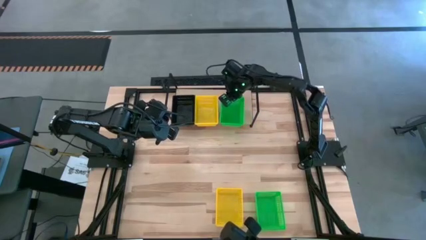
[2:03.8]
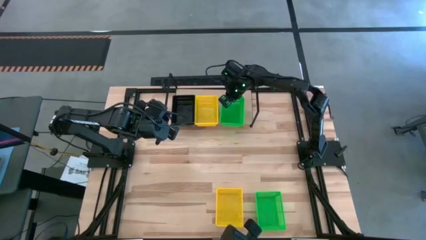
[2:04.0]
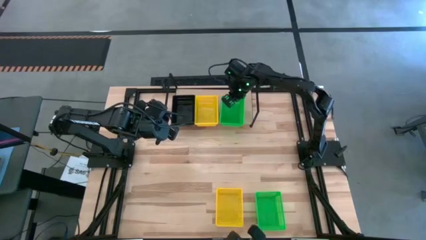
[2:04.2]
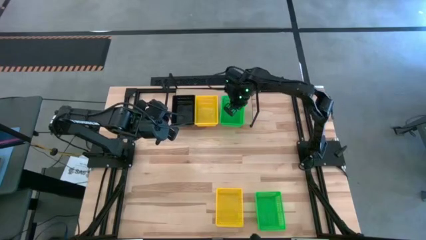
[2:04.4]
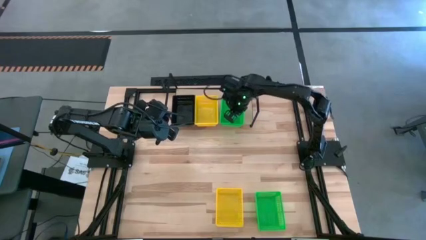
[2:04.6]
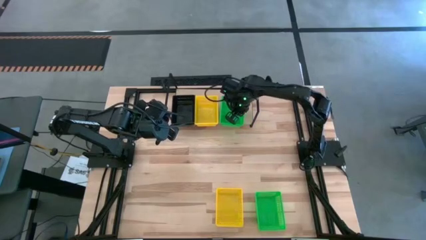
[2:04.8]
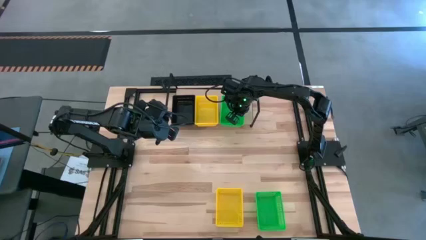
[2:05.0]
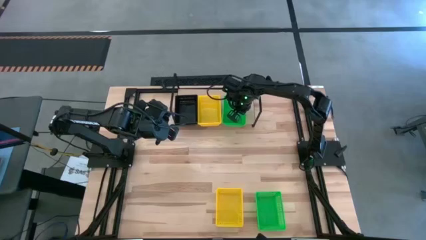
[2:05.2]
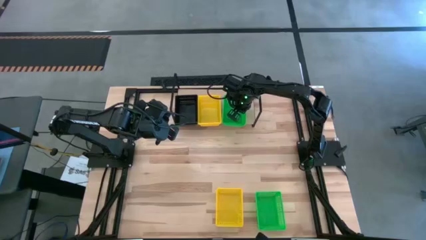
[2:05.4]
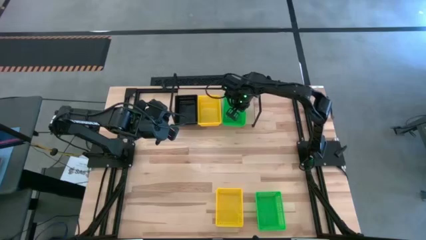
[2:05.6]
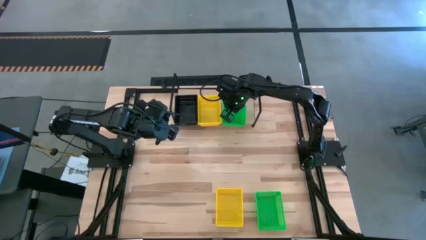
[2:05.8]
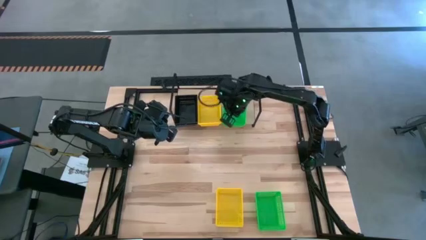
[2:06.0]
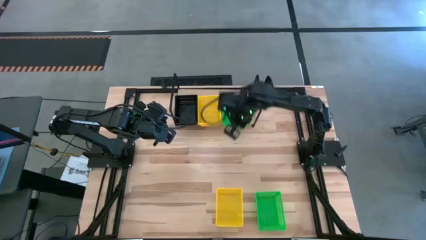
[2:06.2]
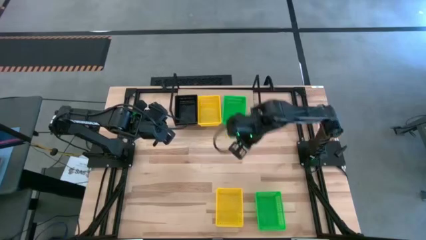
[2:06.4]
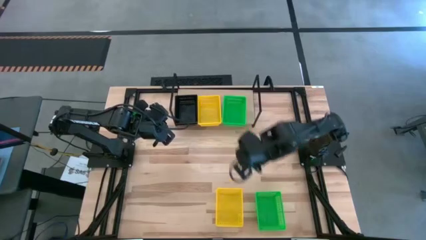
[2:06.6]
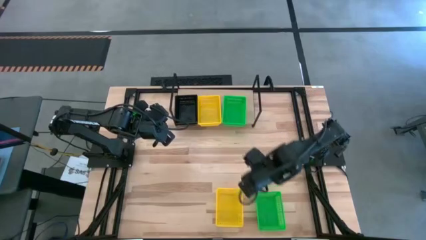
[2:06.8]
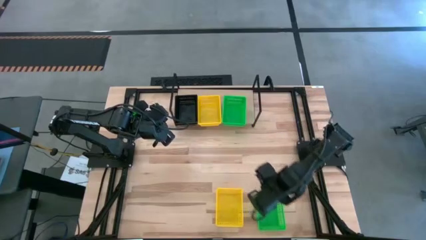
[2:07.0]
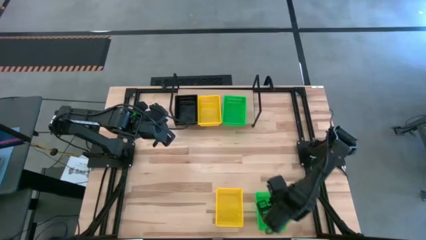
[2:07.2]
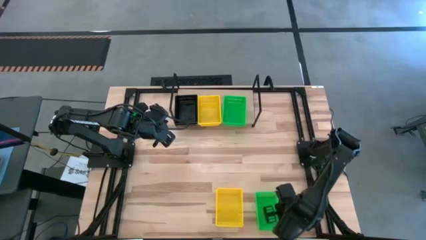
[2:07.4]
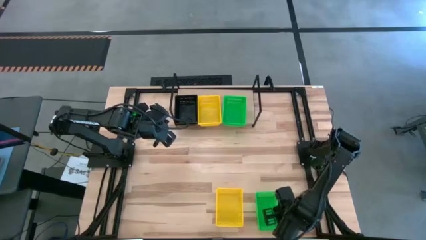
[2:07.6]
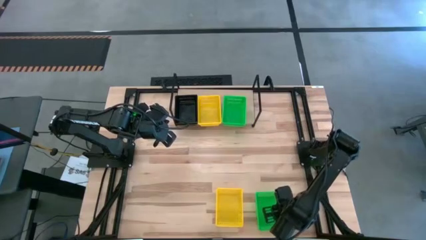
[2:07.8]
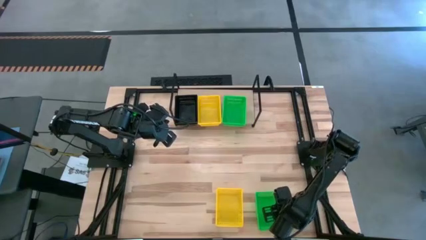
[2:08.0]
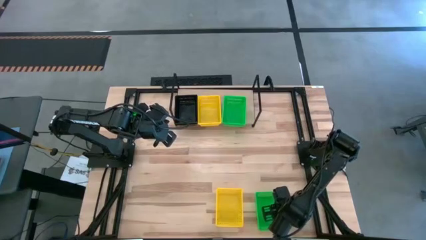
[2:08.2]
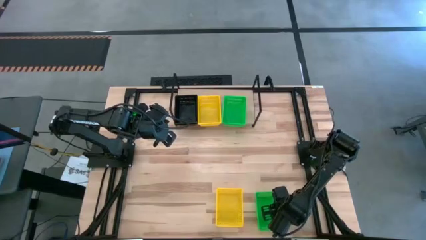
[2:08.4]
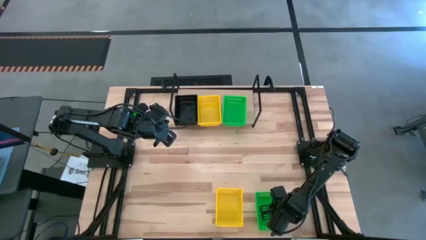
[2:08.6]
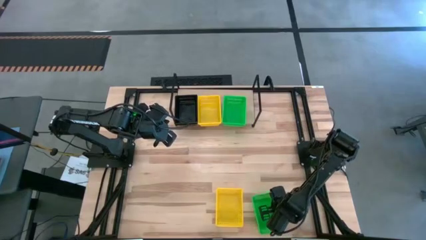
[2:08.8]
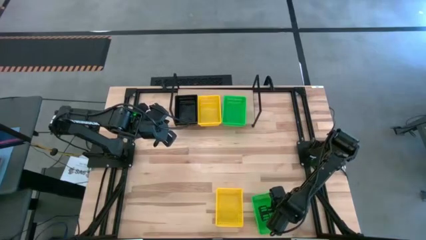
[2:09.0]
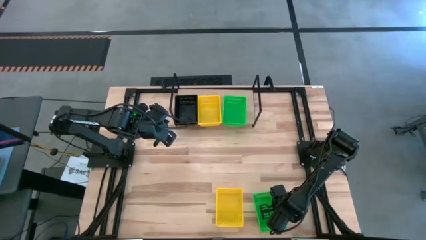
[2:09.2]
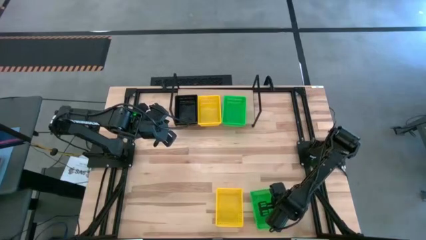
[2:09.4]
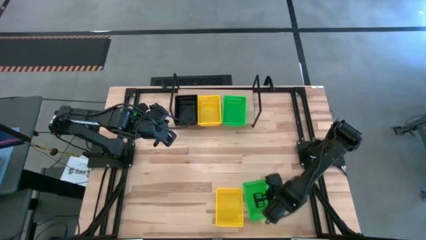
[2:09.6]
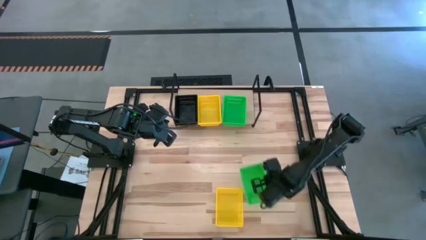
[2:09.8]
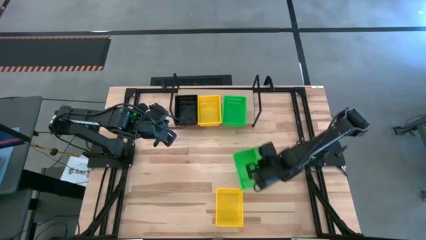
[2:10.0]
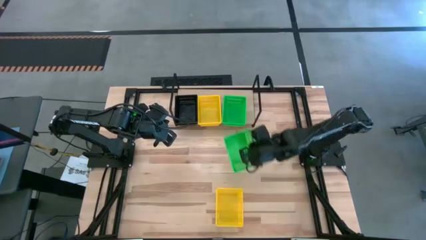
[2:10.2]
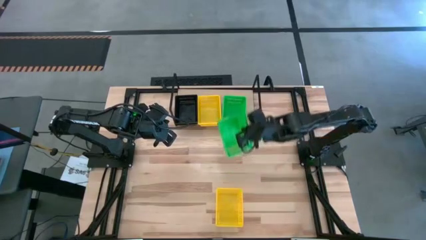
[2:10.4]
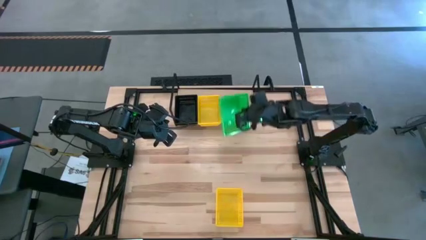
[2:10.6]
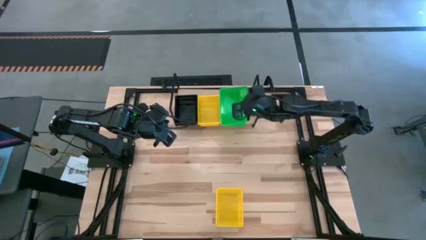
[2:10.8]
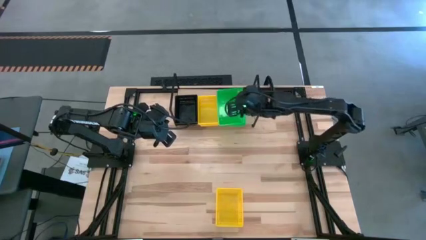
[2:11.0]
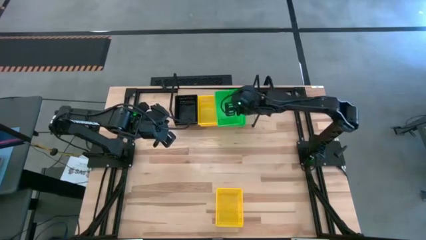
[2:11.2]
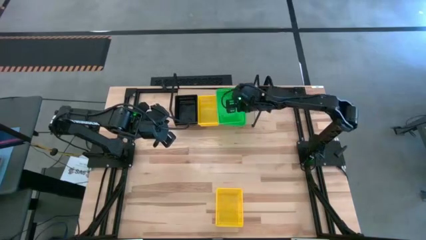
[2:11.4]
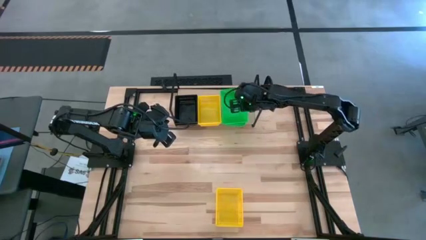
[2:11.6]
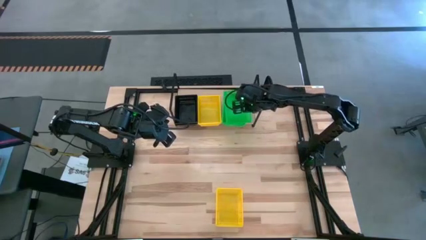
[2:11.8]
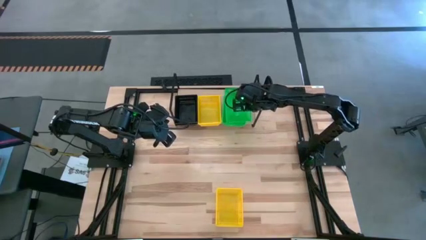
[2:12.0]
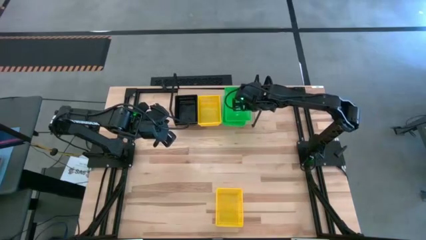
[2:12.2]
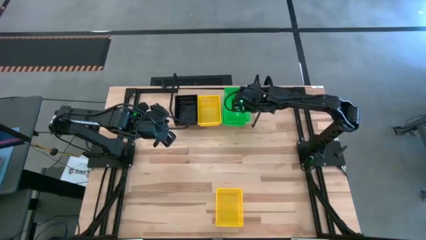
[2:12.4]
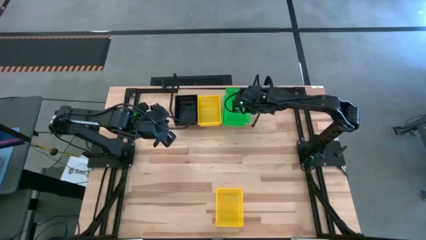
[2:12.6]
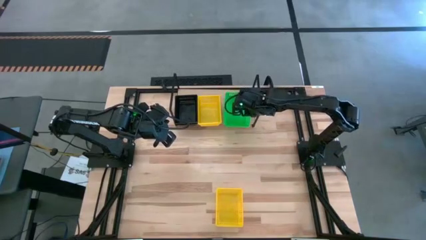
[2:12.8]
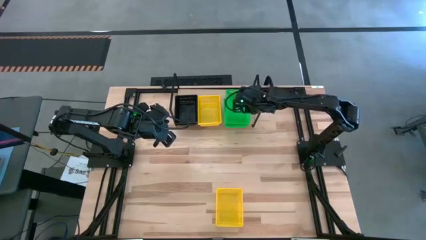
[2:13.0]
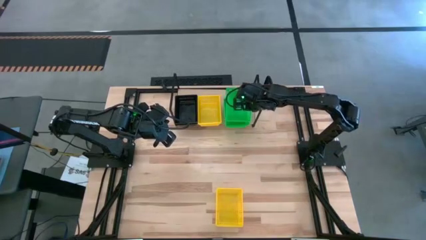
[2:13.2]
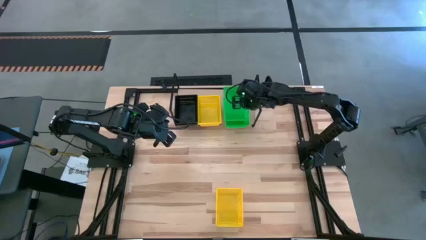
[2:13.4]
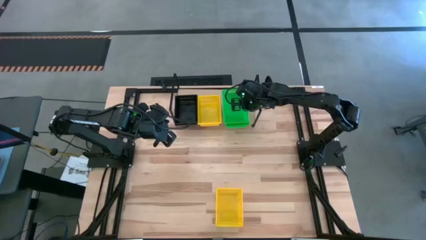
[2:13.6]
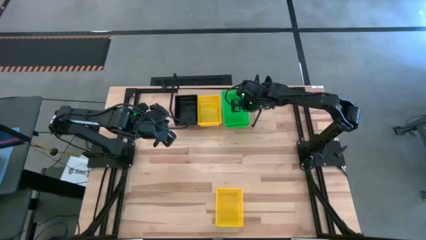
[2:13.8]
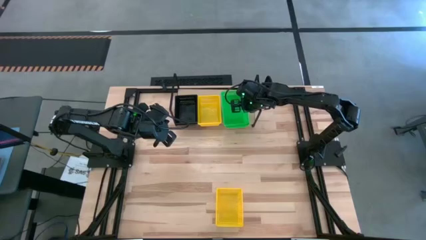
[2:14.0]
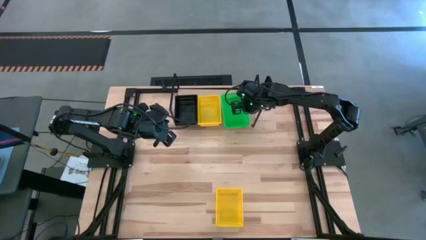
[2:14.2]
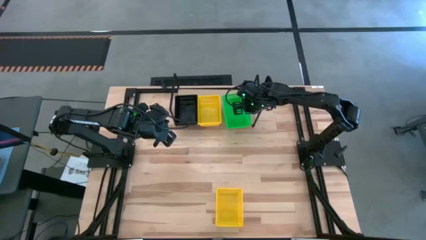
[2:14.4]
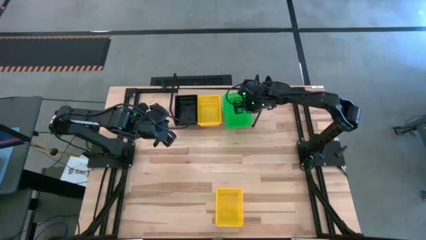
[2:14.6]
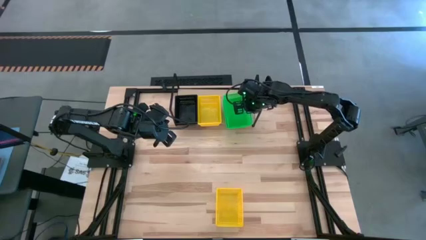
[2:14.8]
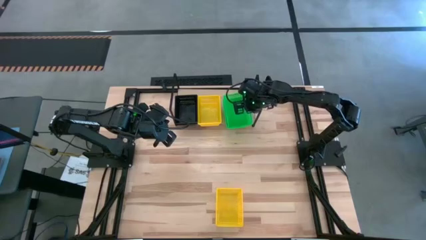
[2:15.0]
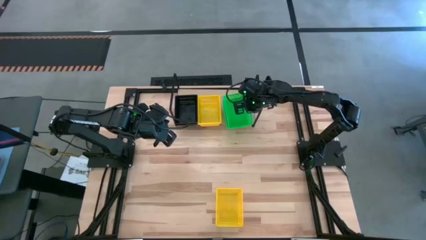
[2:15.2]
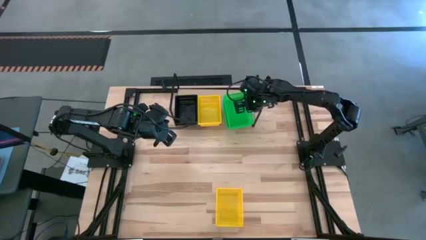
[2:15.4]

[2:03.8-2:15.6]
Task: Stack baskets on shelf by color
Stack the green bin on top of the stacked green bins on the shelf
